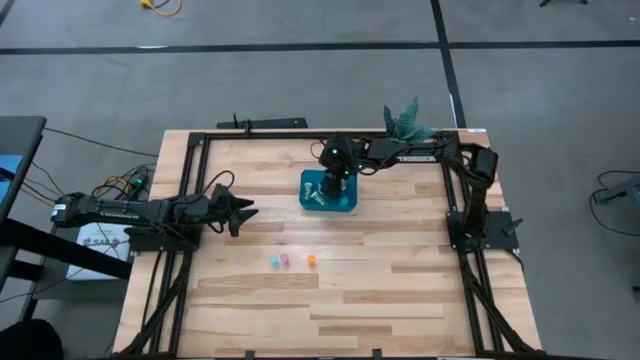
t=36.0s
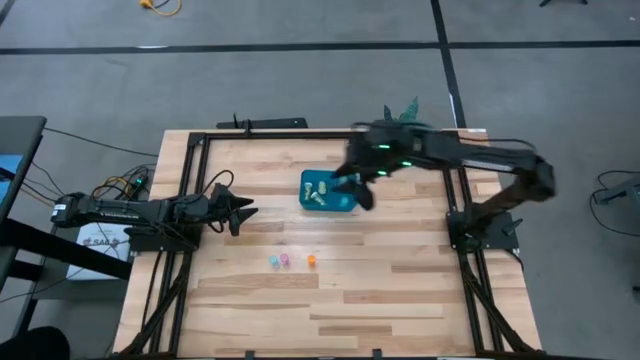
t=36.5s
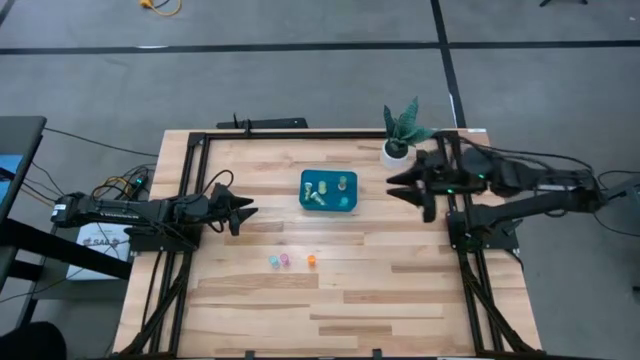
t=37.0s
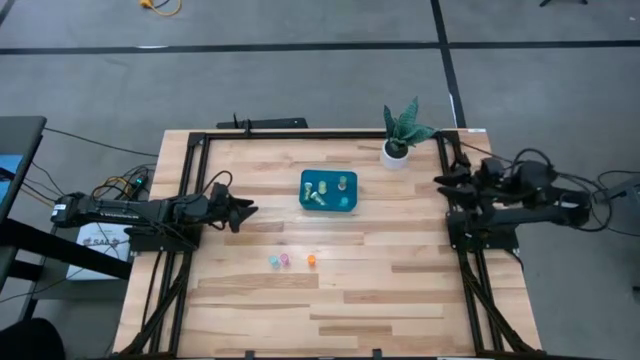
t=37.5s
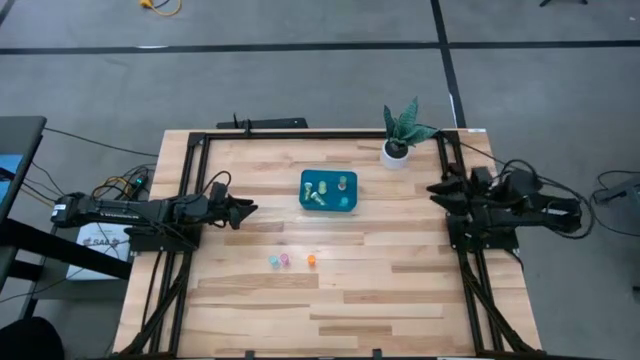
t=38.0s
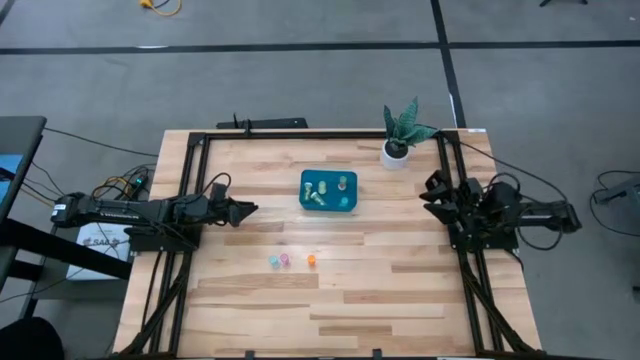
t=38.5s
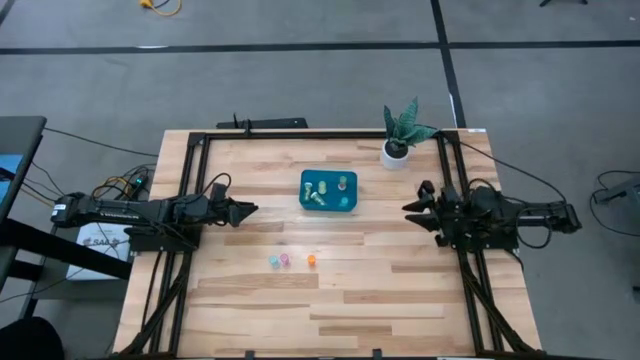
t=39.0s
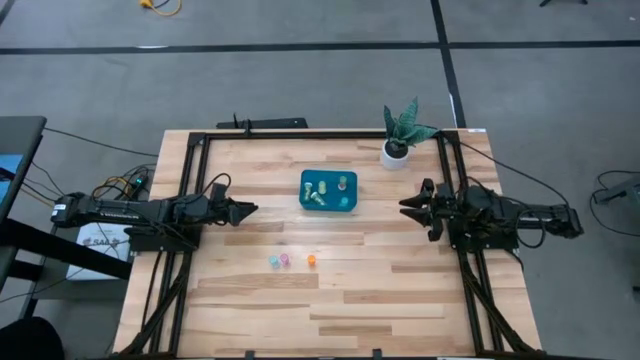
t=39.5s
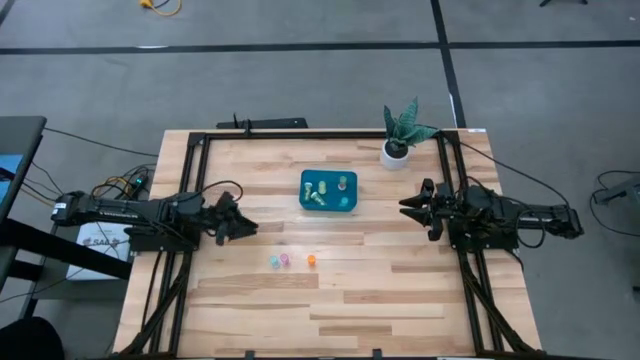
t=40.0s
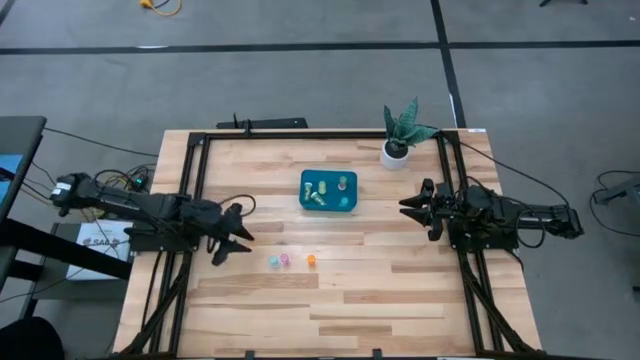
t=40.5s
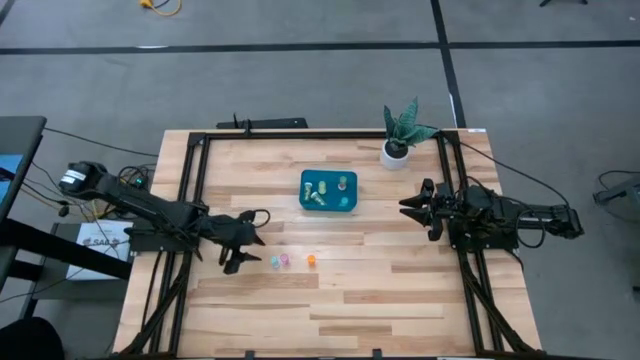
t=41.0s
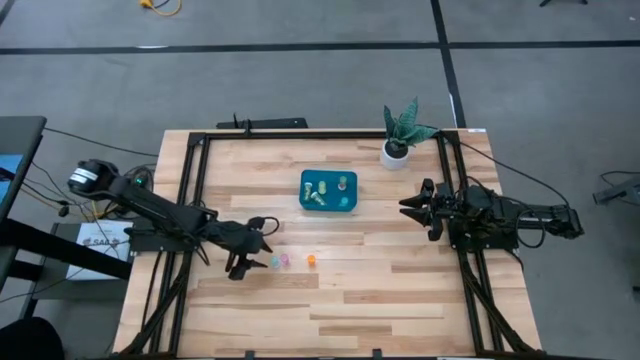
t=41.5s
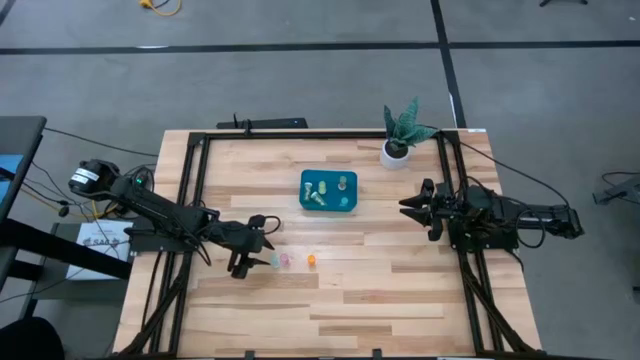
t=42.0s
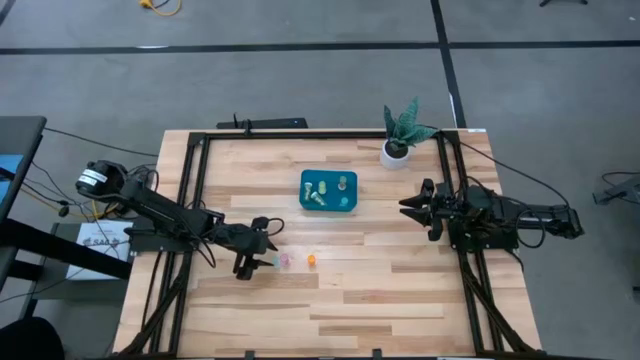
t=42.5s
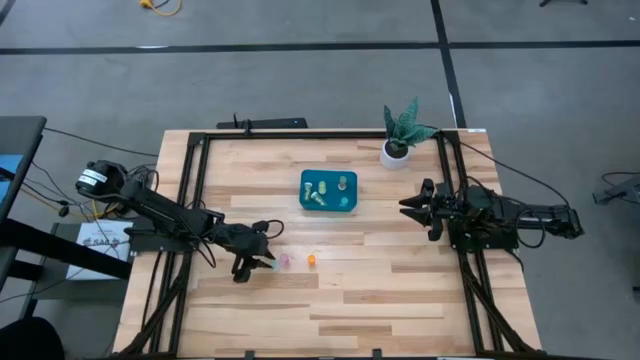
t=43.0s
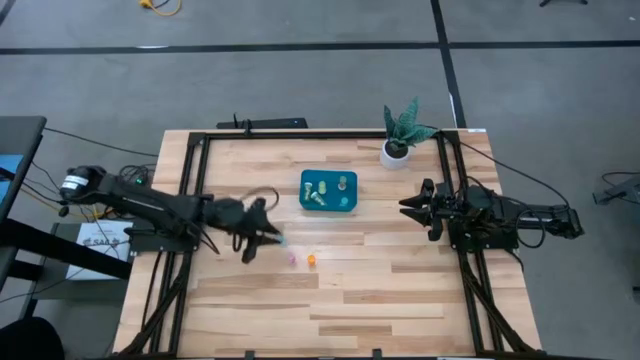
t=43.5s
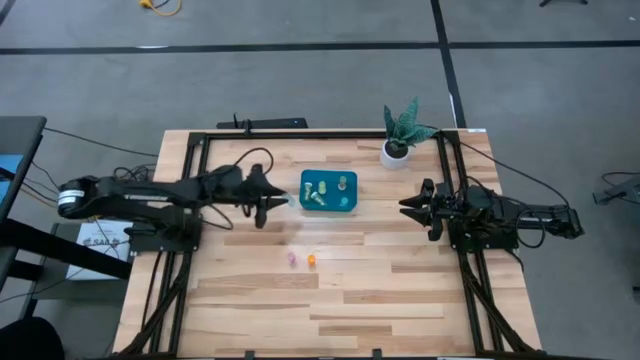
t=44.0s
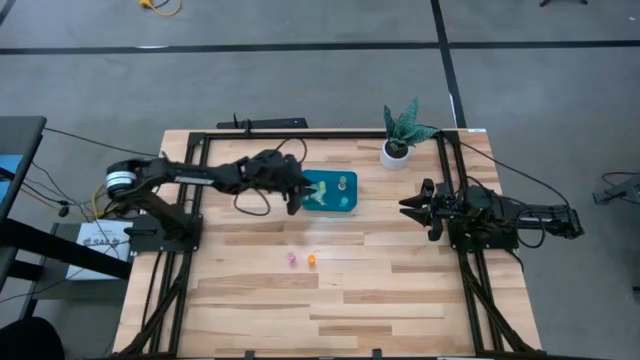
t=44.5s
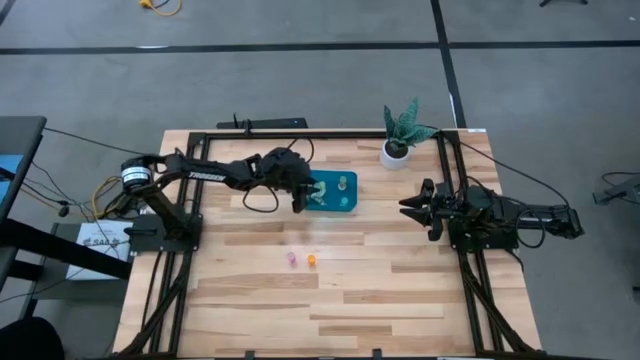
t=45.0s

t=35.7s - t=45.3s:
Task: Pick and place pill bottles into a basket
Put the blue medicine bottle into the blue bin

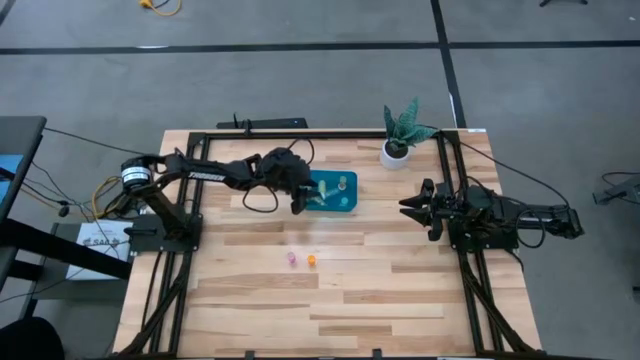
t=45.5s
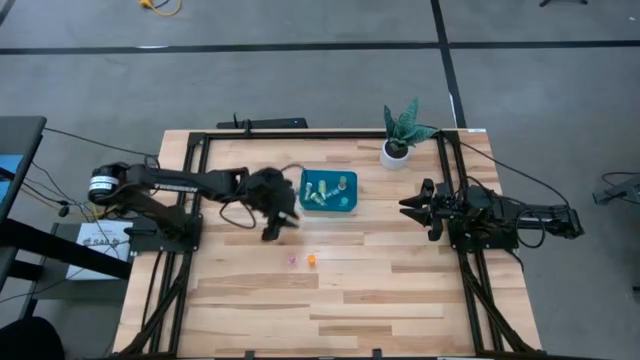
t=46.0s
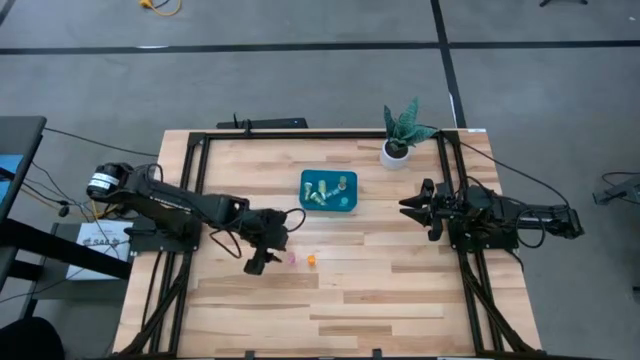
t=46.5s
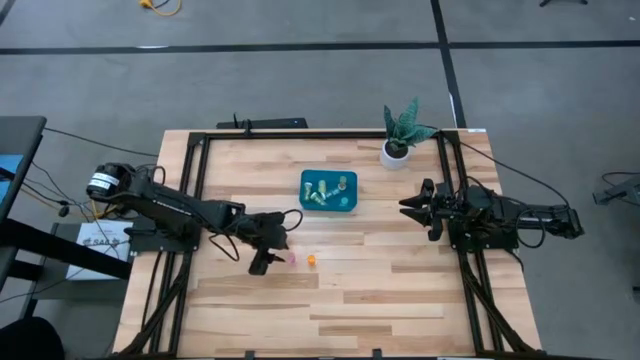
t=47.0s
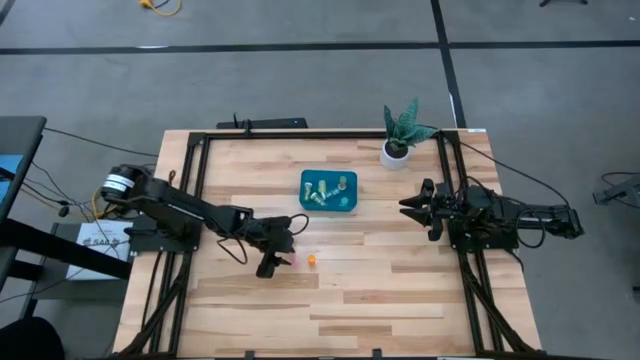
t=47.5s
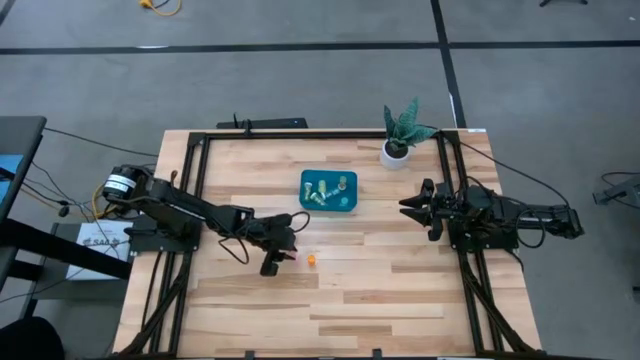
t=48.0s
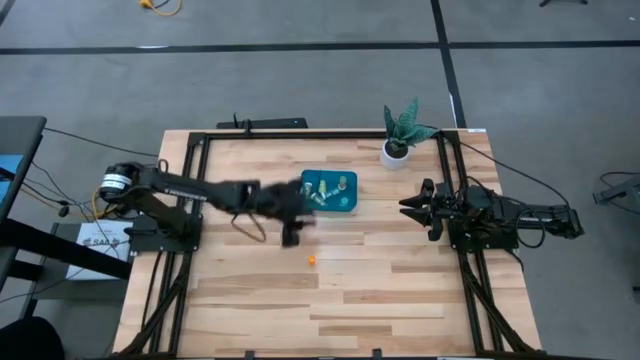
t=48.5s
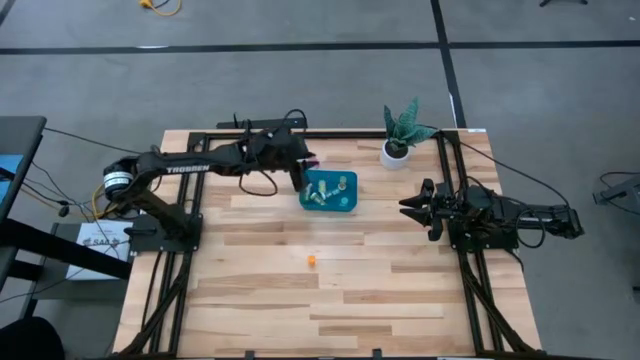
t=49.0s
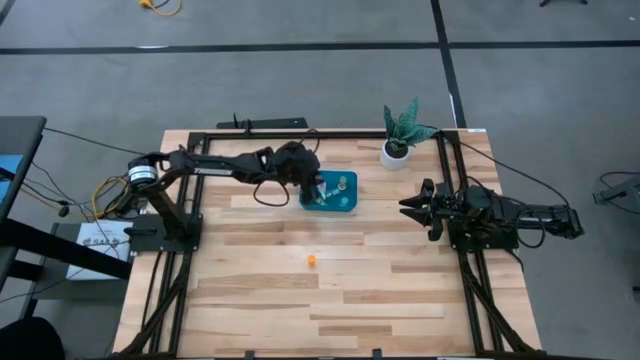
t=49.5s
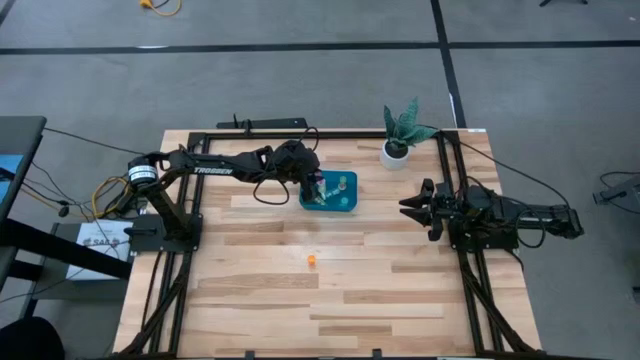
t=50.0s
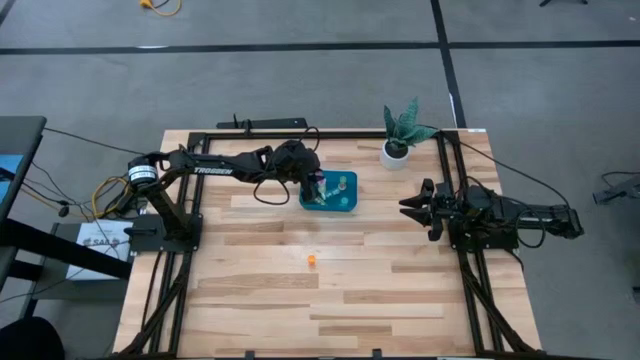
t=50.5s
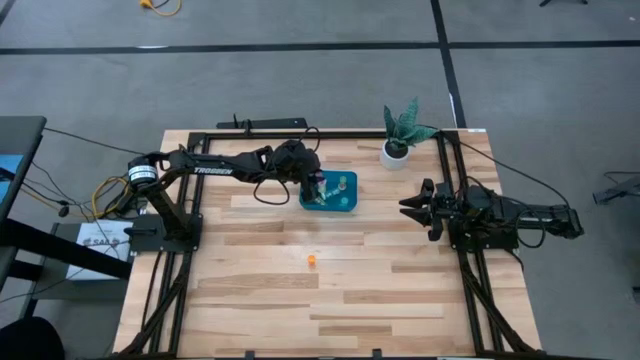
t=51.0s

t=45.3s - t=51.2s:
Put the pink medicine bottle into the blue bin

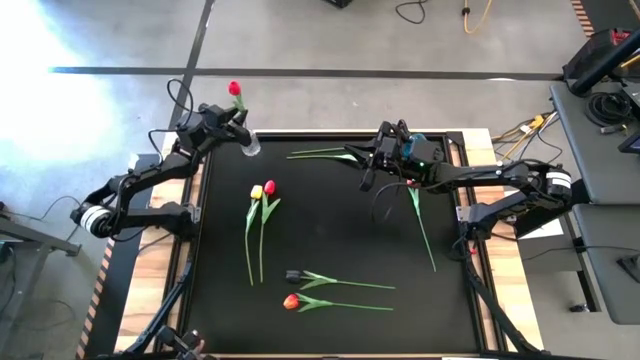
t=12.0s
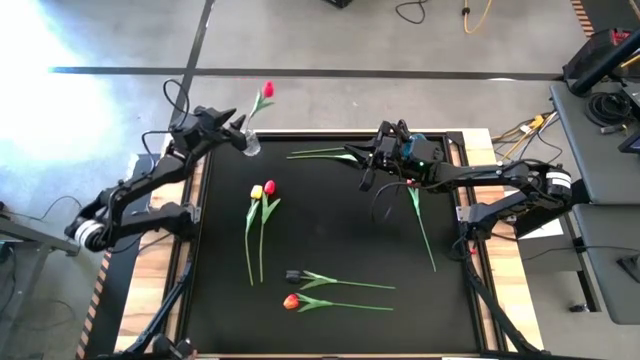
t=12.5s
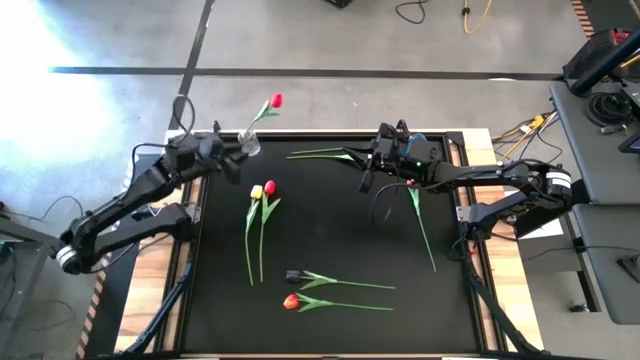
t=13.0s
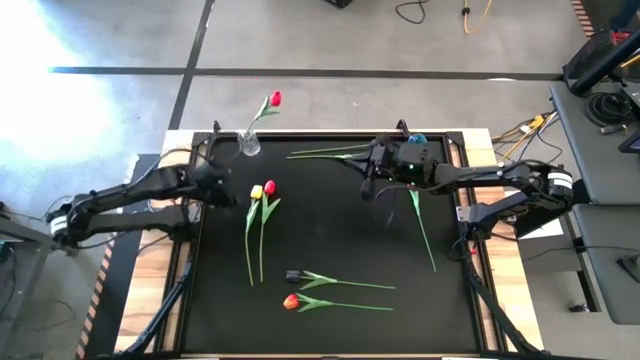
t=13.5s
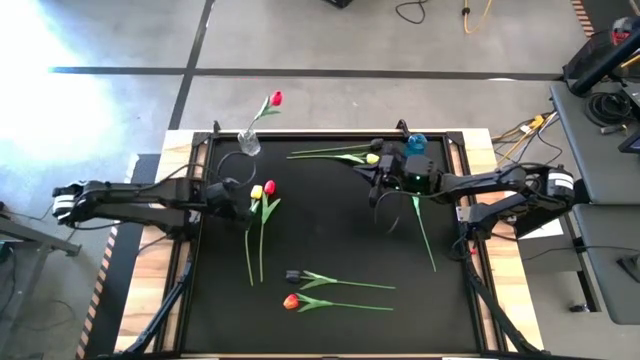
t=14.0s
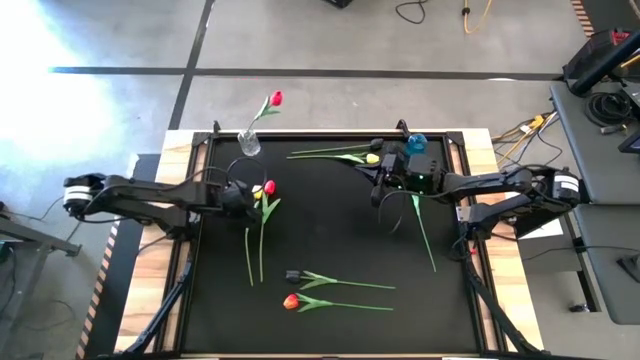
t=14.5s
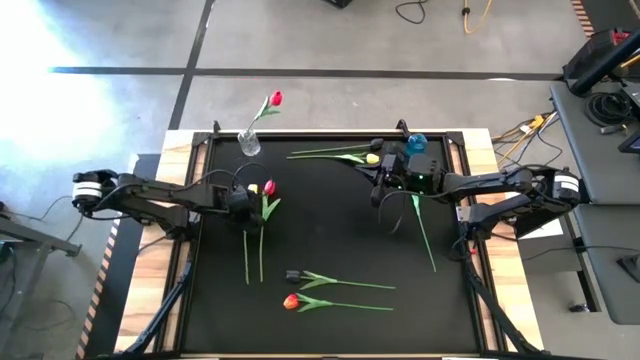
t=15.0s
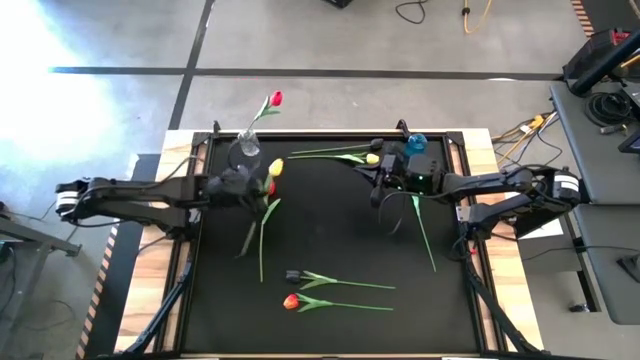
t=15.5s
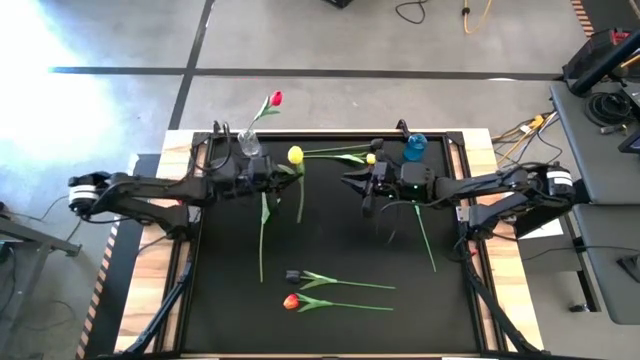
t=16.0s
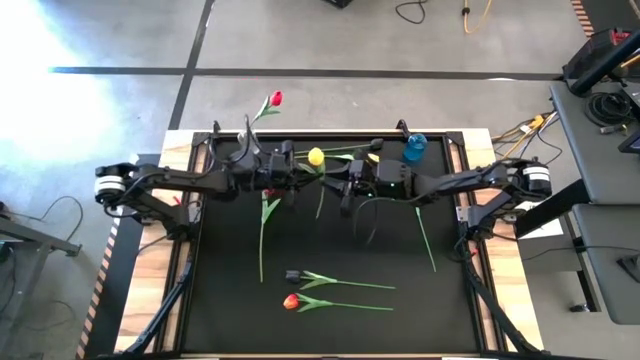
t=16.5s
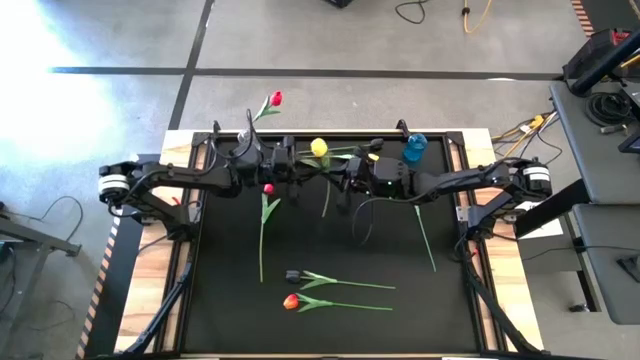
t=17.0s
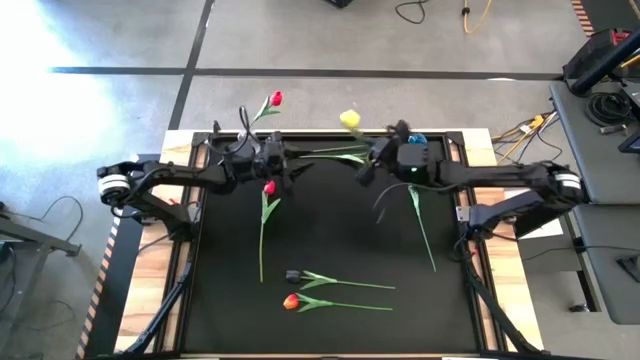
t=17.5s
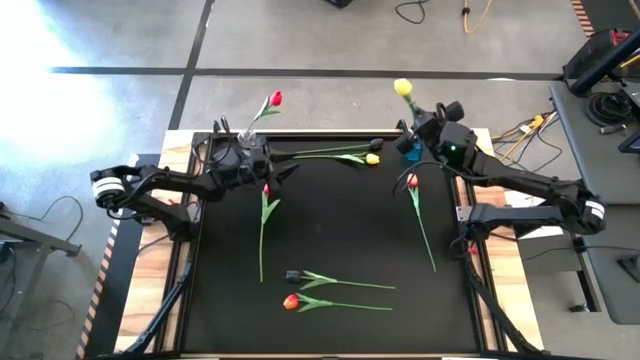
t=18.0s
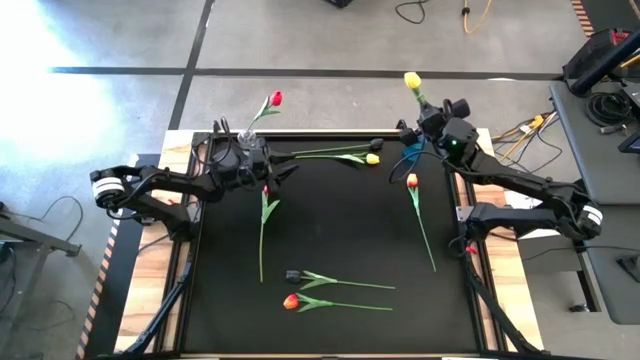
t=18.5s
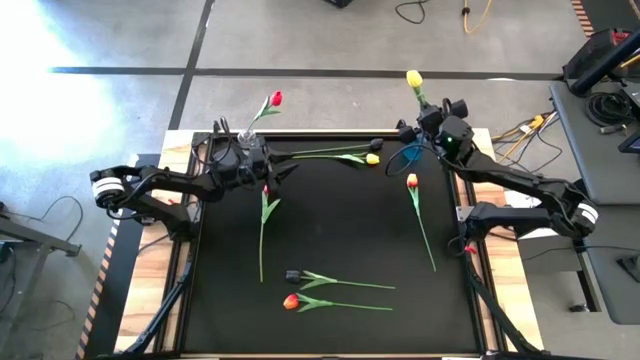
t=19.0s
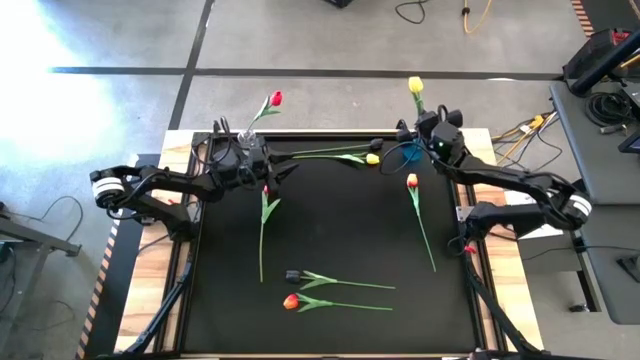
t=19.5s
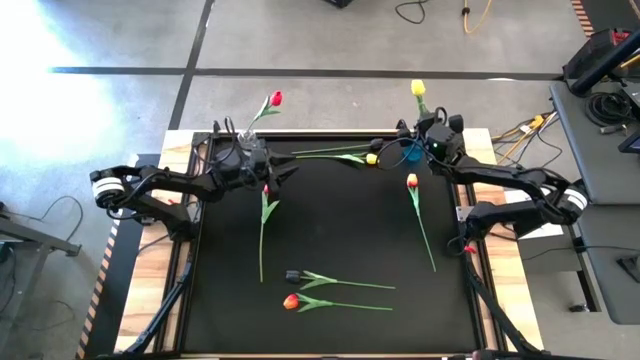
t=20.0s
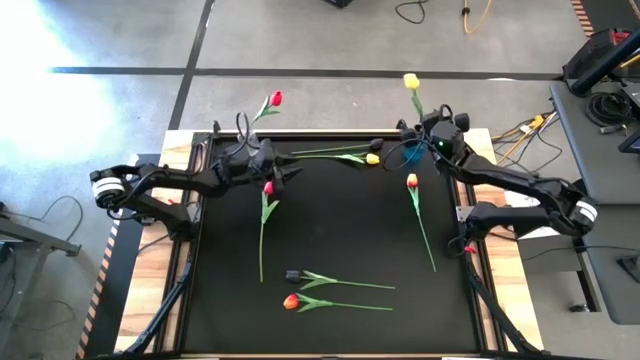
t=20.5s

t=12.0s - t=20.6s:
Task: Sort flowers into vase by color
Put the bottom yellow tulip into the blue flower vase
